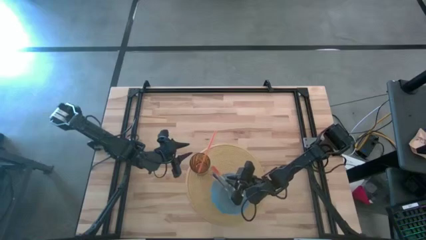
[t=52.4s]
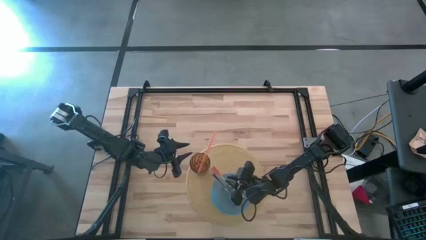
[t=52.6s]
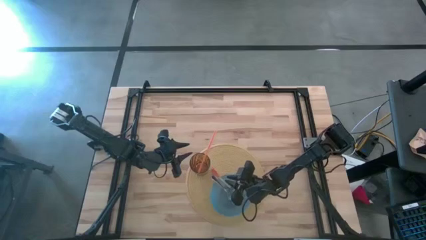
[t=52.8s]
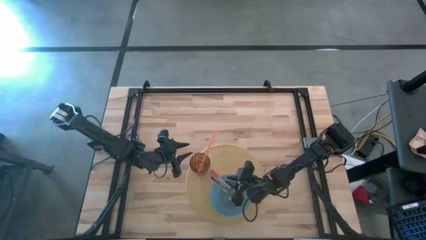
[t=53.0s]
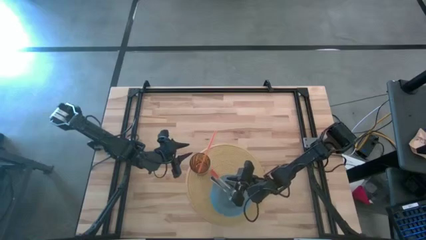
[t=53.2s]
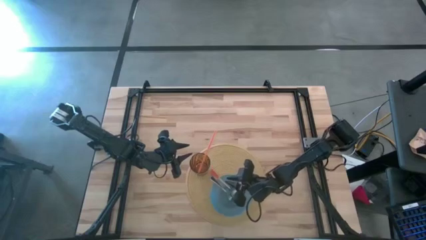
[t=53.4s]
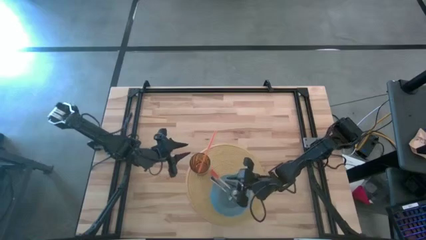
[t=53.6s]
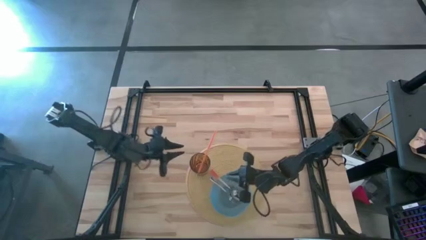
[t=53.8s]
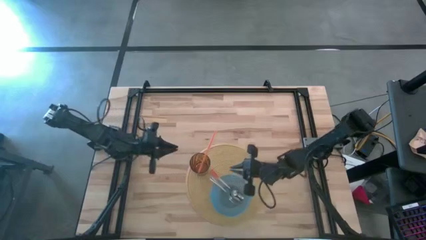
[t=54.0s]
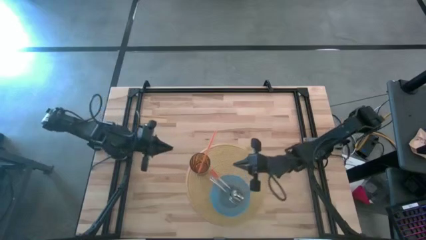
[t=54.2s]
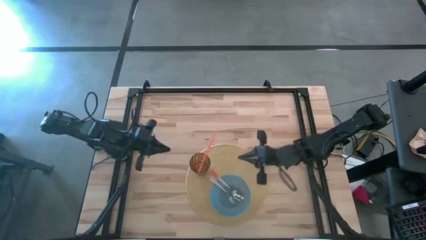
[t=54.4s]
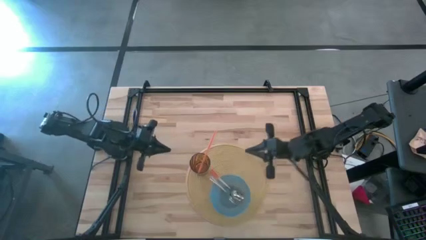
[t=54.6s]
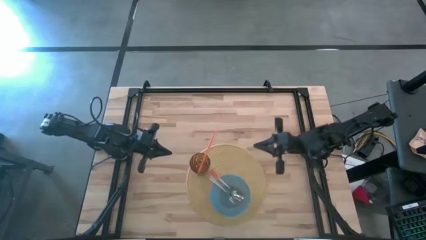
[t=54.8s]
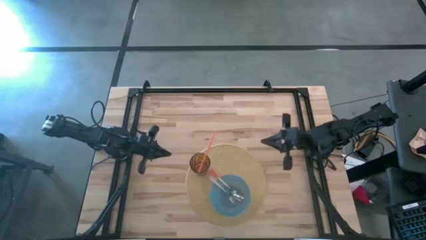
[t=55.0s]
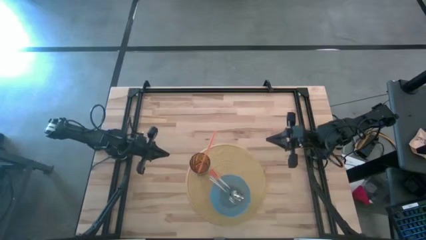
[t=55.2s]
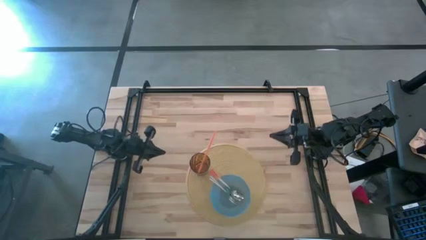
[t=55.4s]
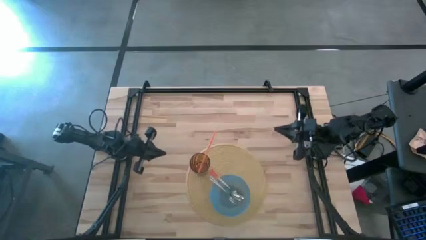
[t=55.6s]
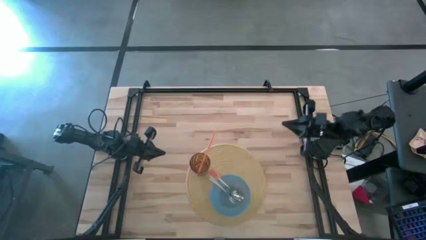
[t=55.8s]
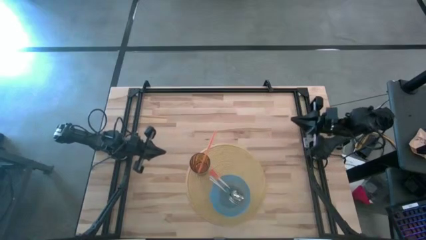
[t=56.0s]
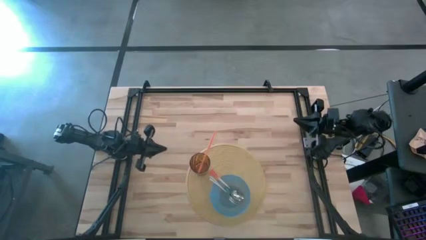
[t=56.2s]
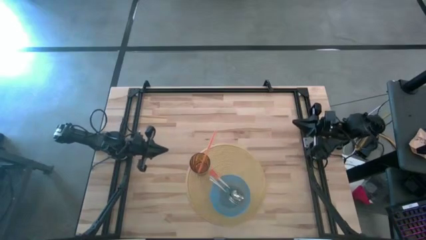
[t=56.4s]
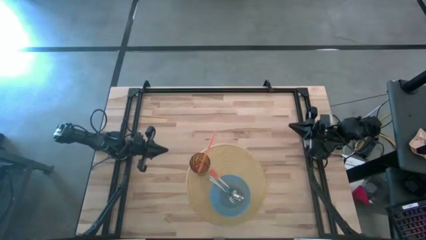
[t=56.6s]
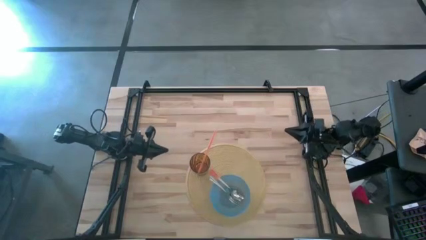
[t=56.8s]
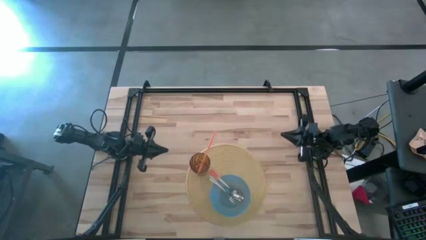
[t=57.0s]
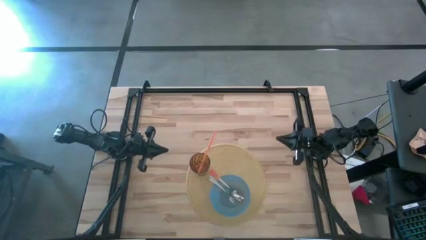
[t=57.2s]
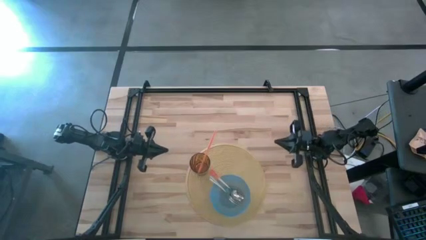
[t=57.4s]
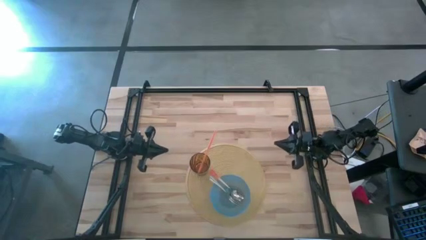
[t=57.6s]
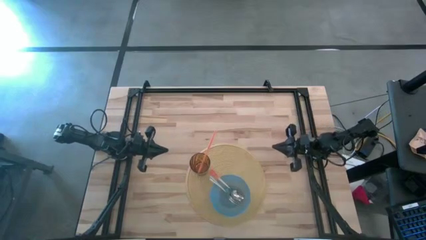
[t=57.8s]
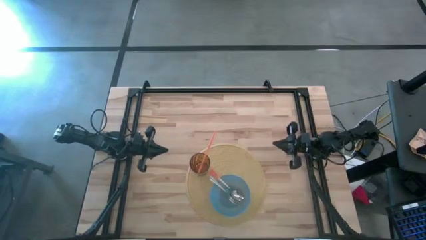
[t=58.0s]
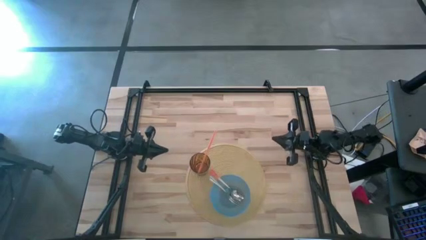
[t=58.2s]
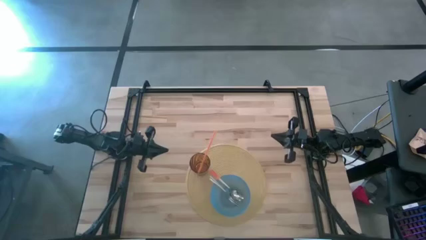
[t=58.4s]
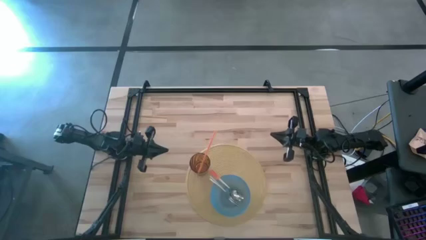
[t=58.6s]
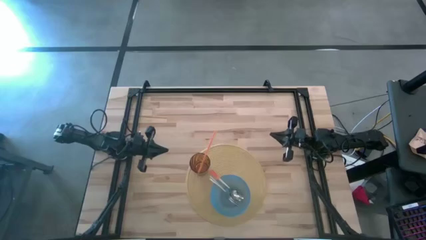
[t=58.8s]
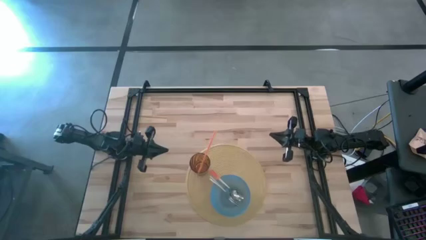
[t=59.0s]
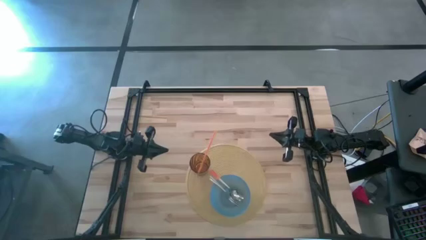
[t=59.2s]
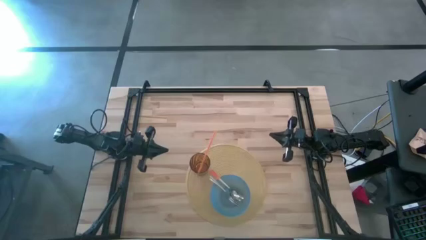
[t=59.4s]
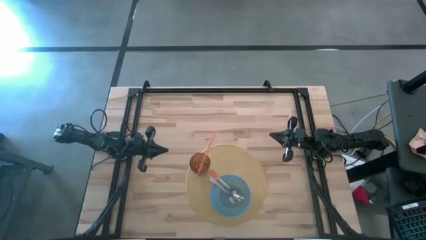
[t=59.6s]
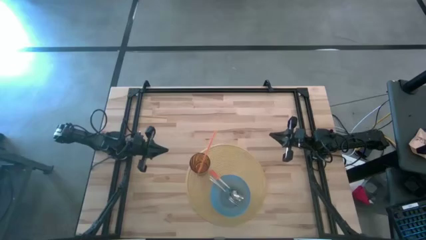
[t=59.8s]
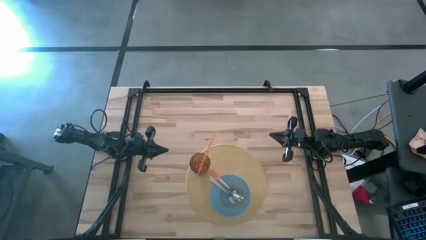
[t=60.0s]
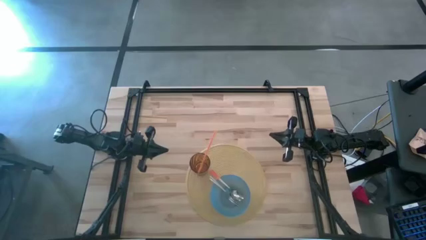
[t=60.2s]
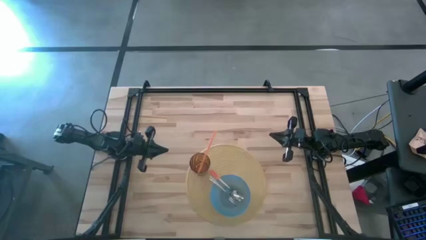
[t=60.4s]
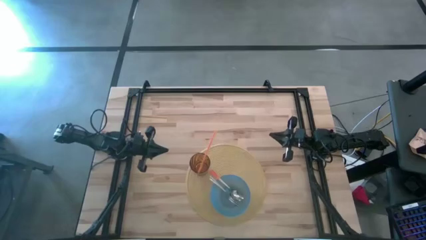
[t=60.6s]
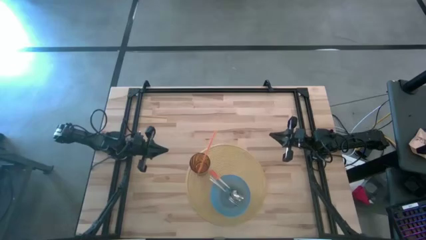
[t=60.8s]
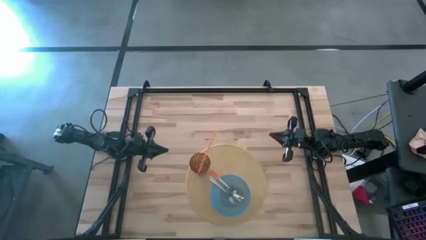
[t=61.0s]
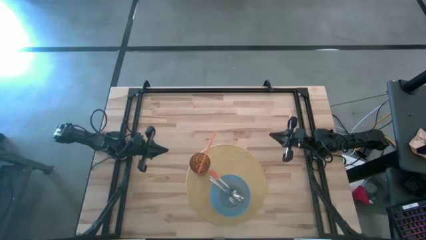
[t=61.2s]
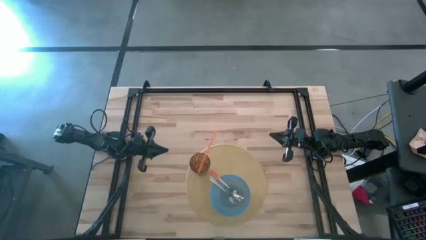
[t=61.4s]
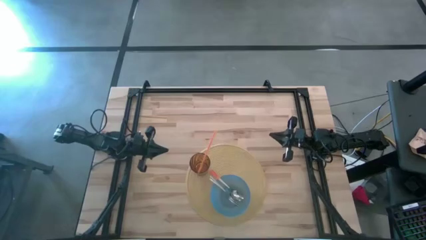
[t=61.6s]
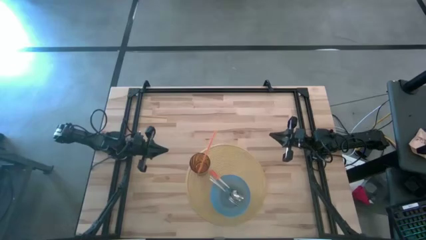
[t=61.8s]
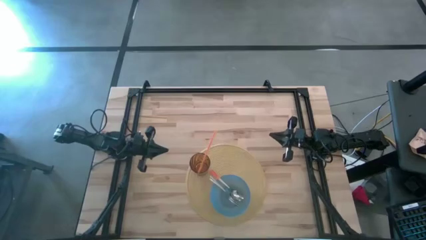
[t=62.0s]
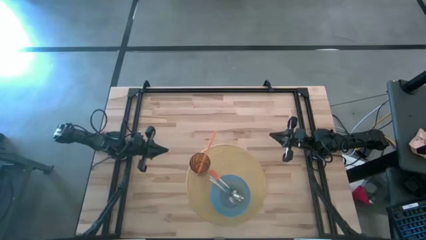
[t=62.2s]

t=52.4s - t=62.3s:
Task: Pick & Place Utensil
Return to Home Position
